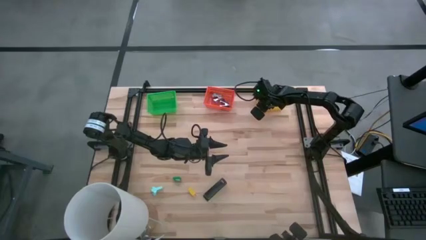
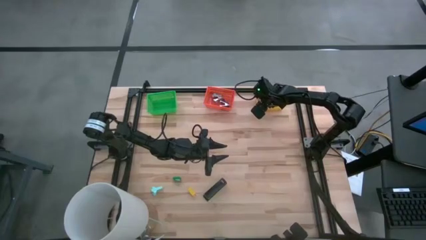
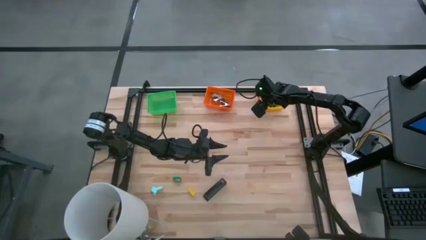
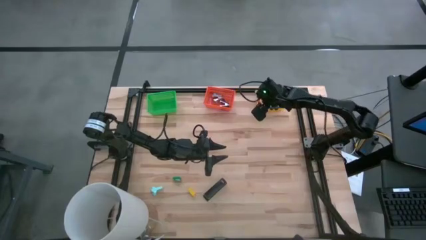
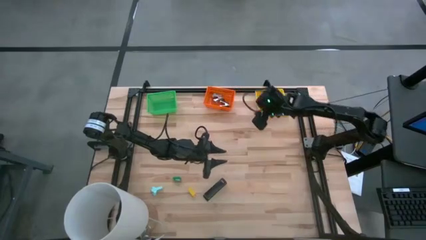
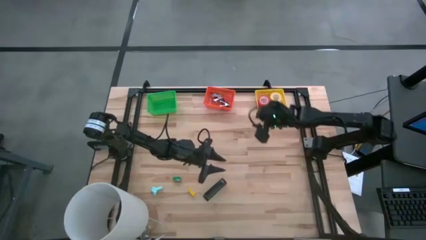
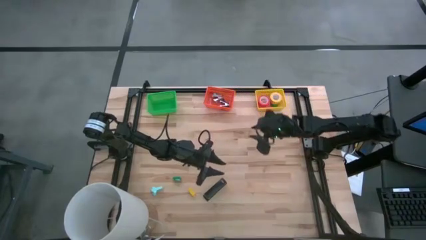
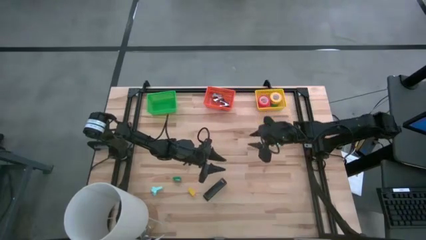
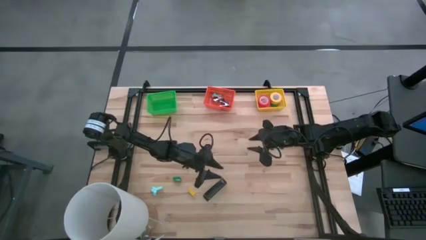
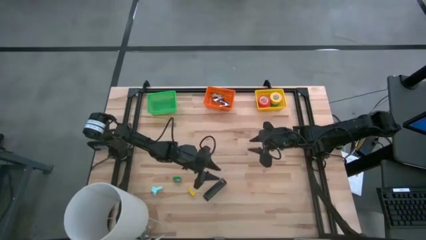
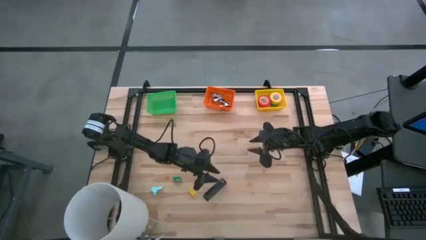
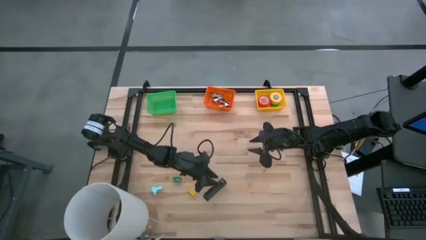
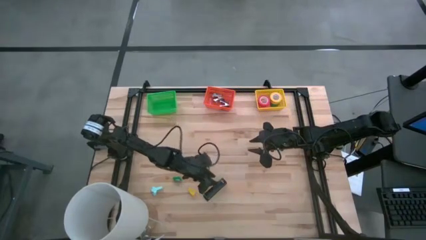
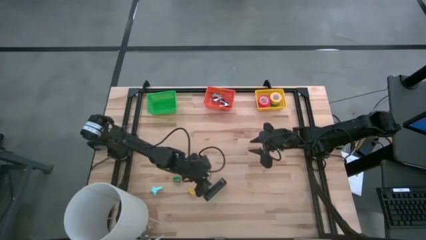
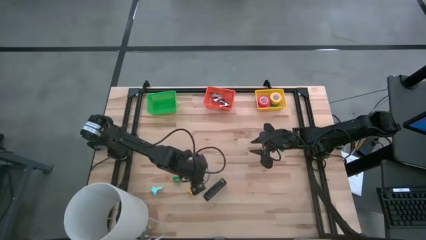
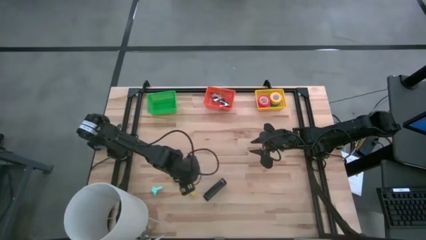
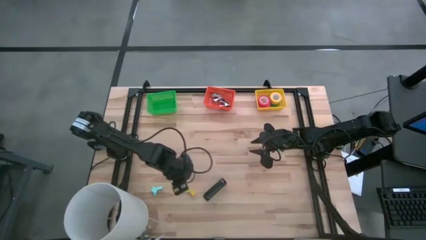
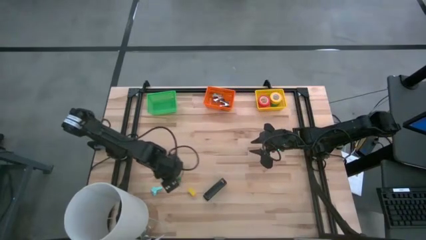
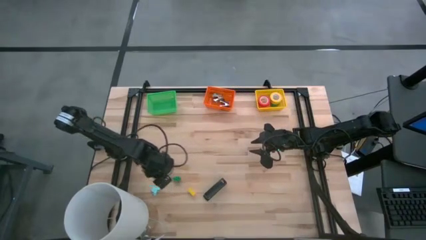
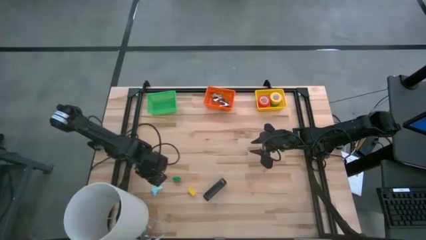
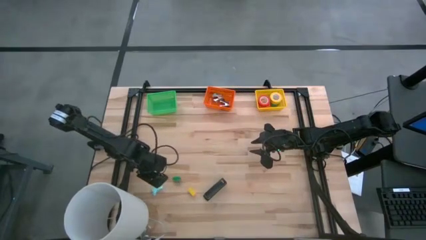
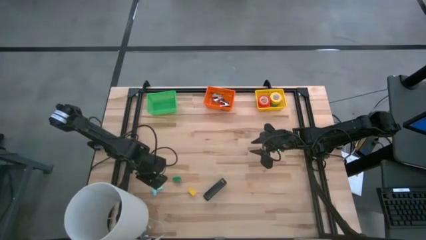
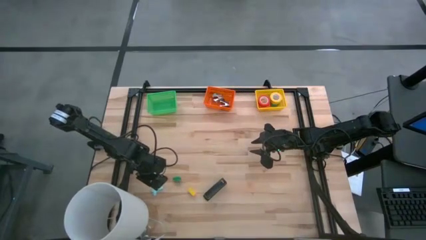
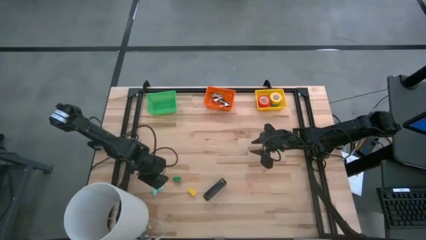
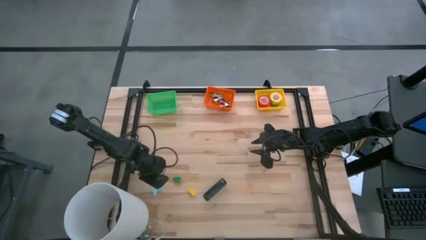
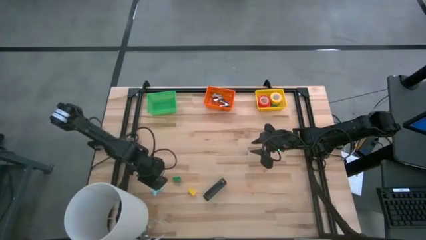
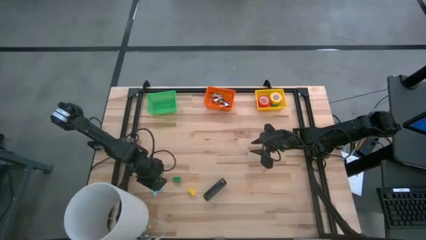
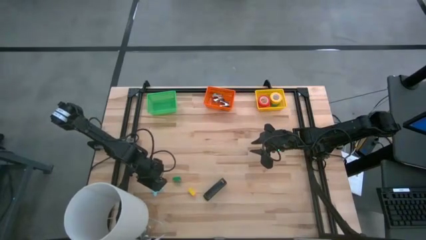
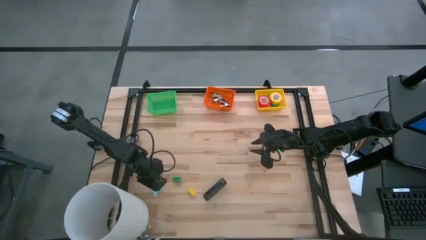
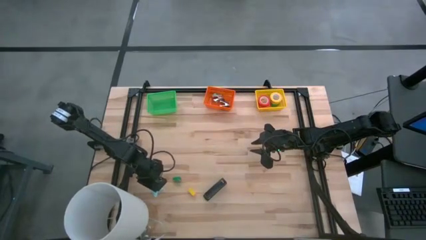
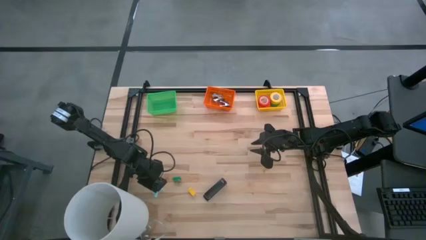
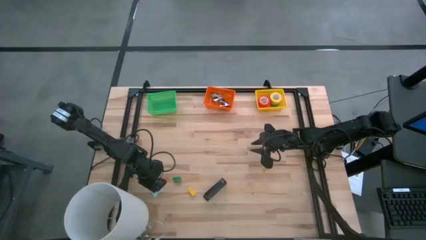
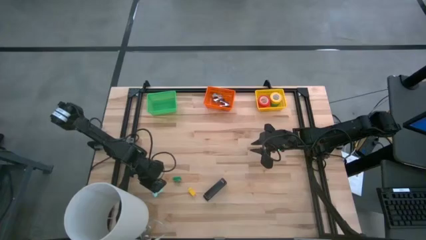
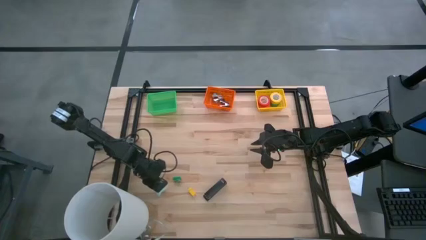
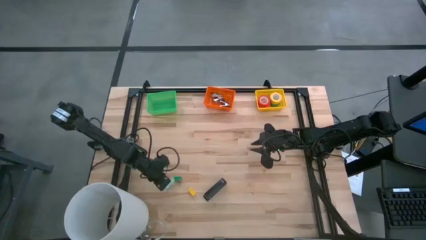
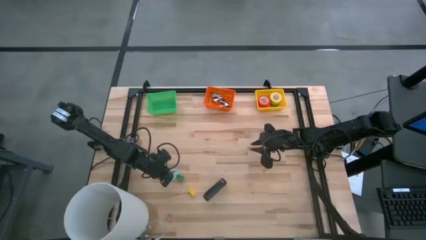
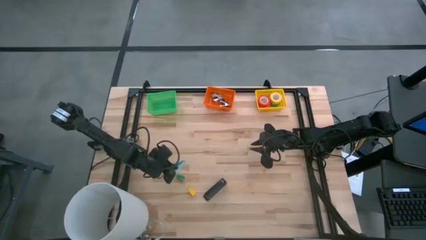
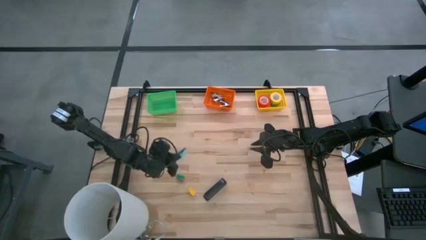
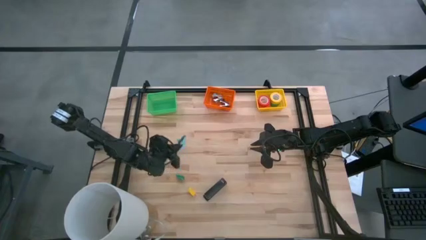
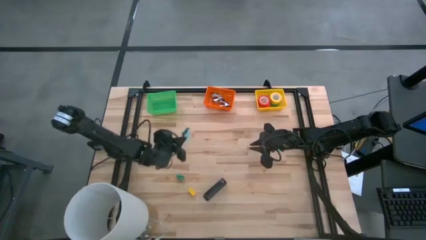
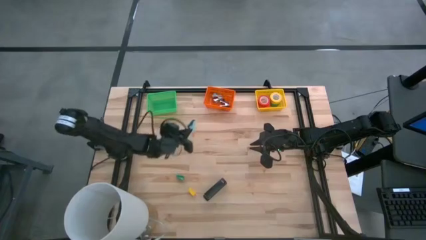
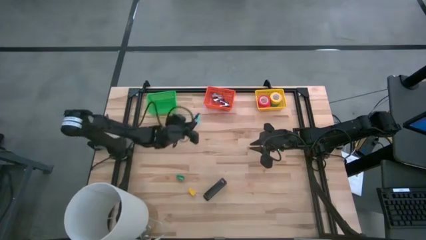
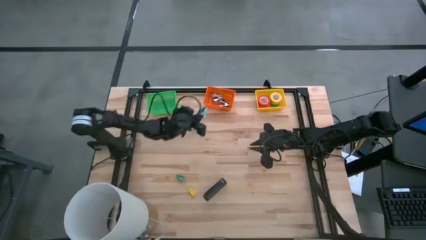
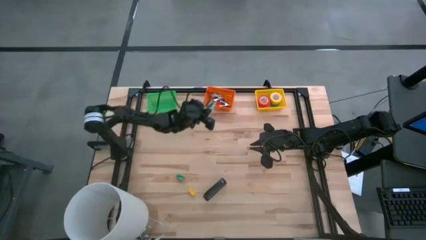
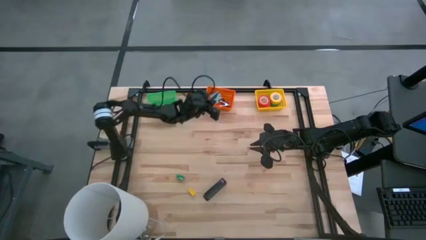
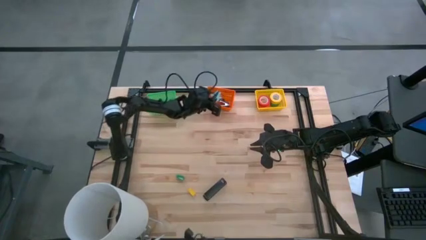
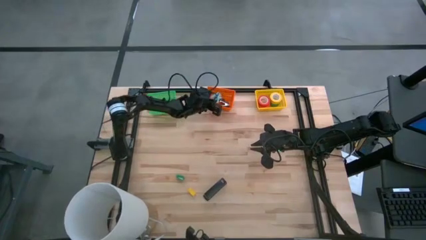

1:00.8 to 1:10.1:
Task: Pick and place Stapler, Stapler remover, tape
Put the blue staple remover into the orange bin

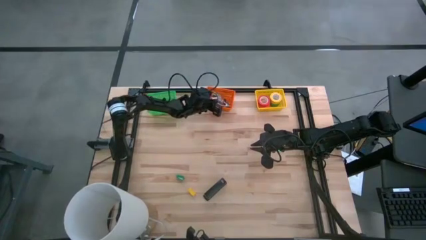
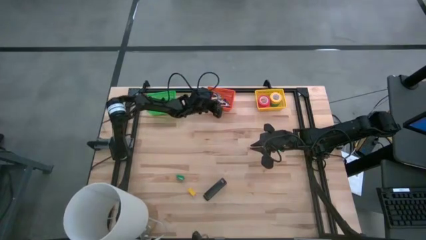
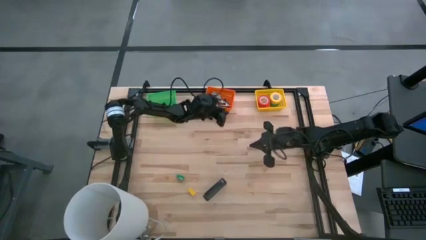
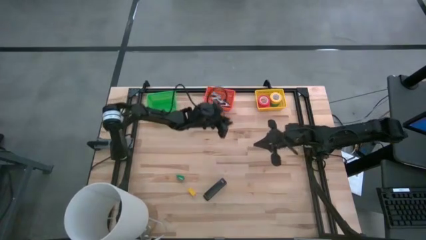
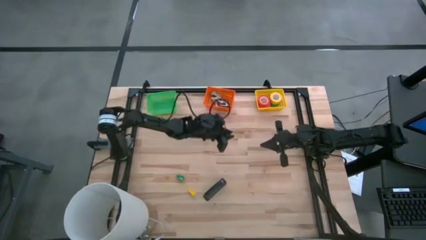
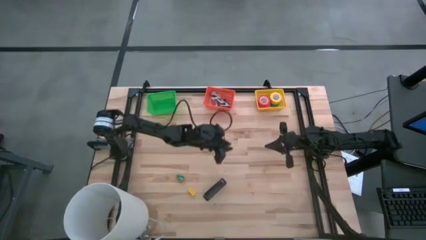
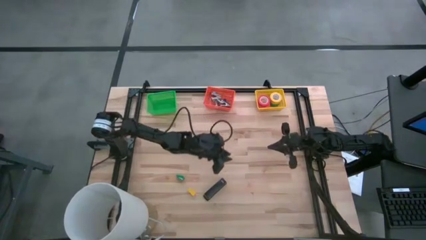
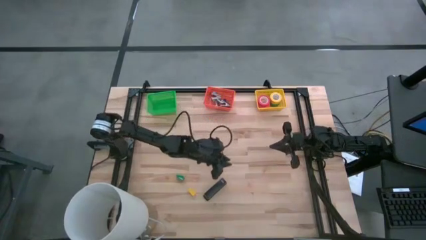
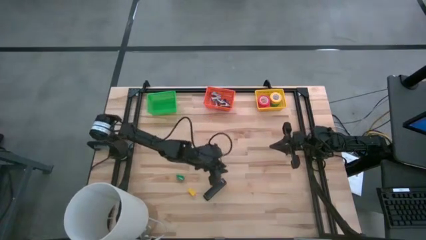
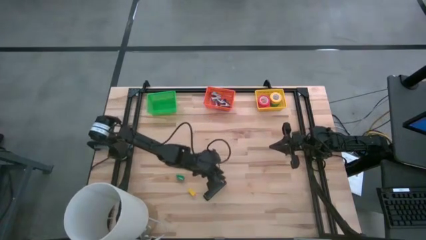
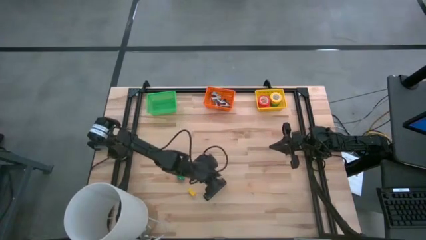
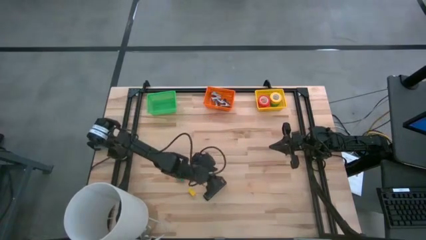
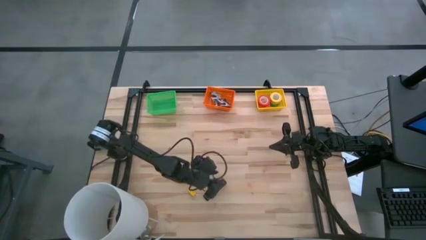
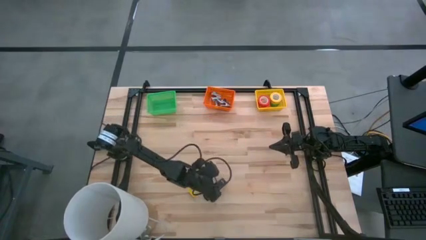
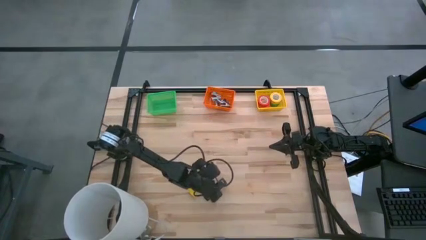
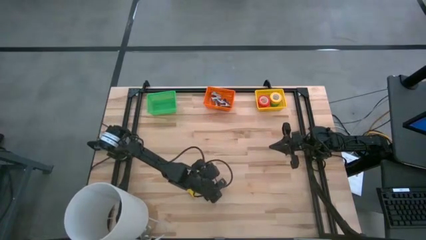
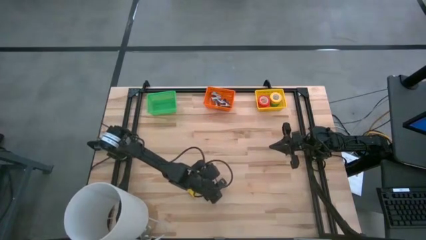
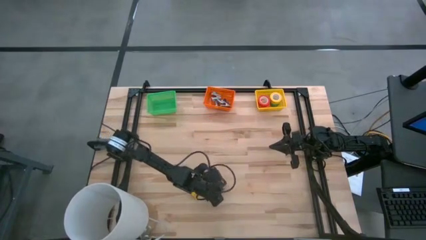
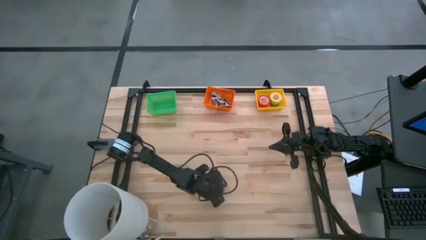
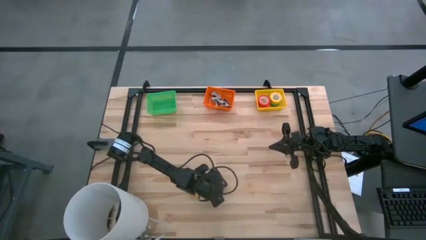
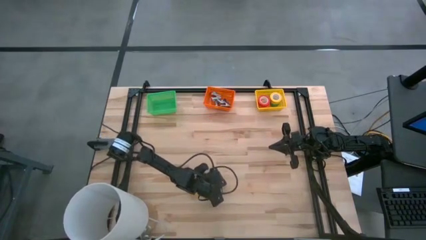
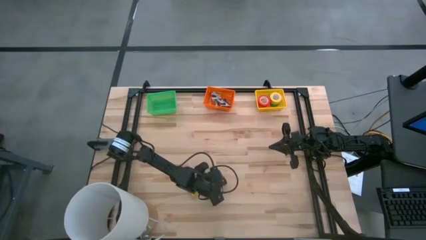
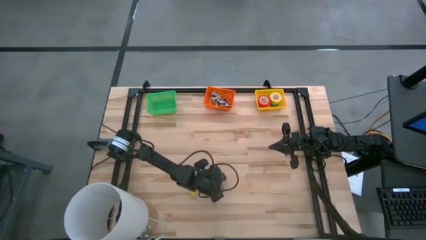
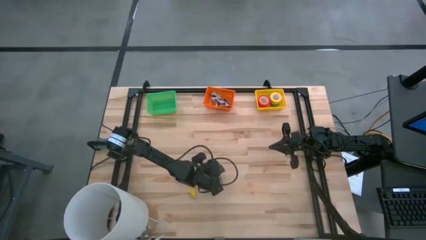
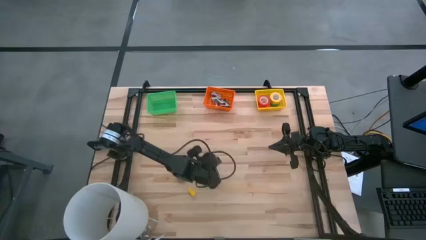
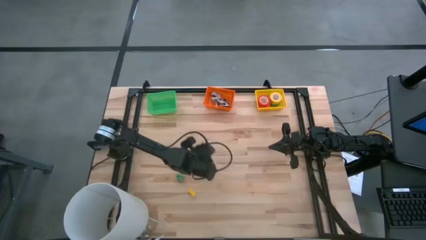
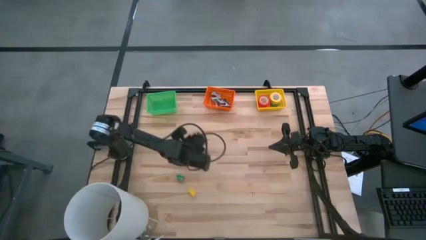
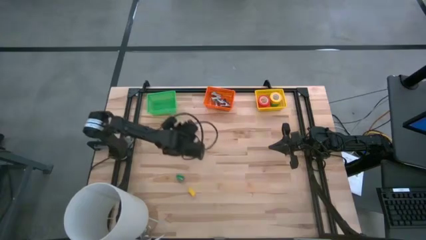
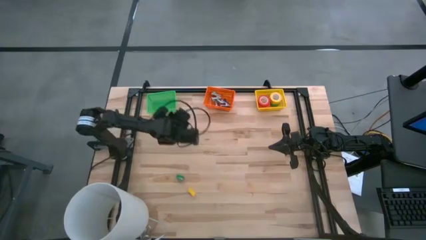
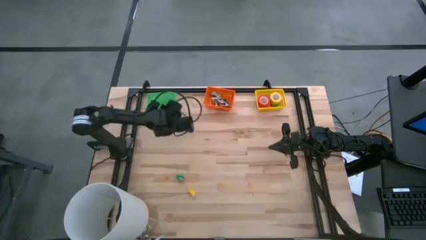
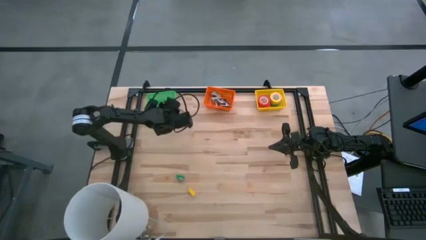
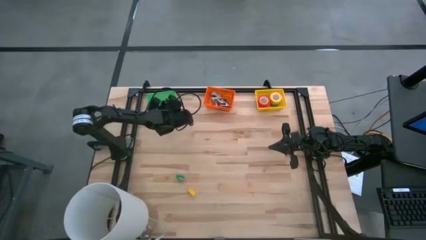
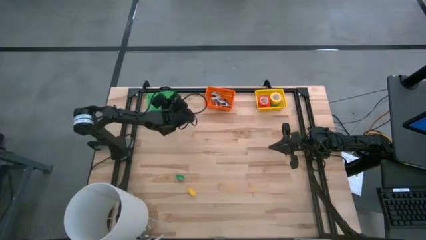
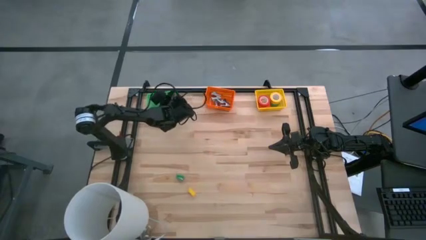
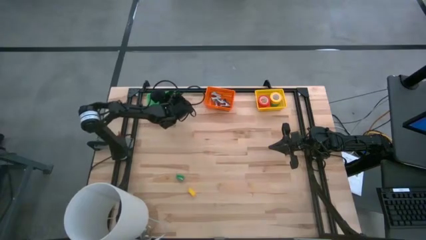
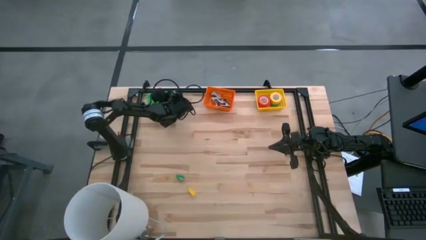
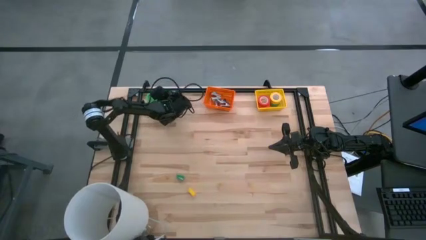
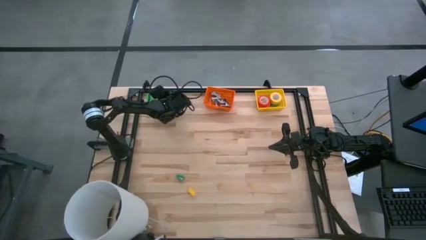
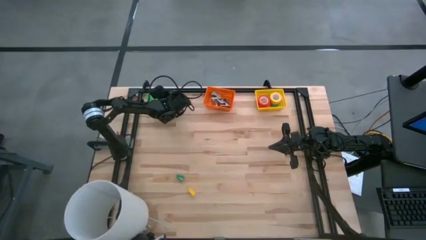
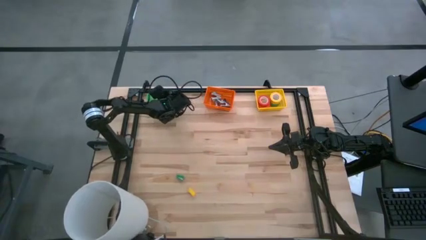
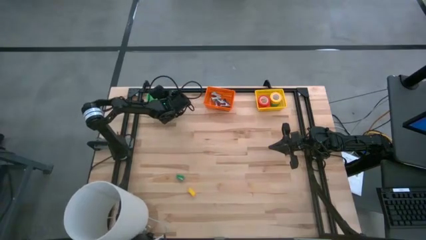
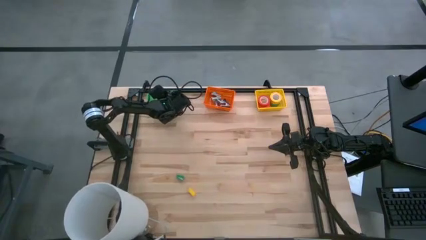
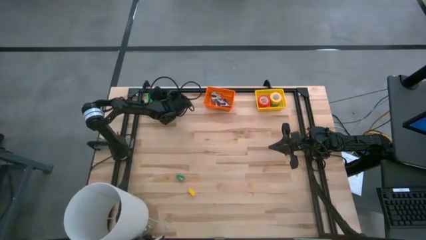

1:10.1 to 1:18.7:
Put the large black stapler into the green bin
